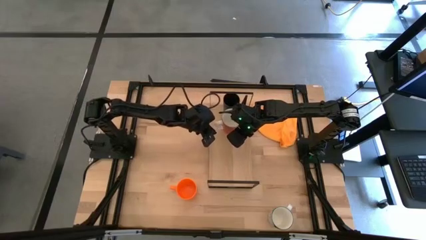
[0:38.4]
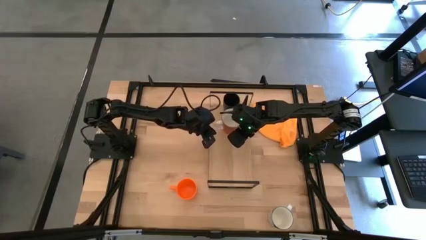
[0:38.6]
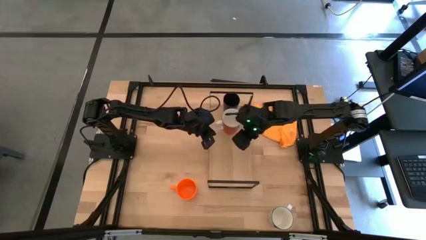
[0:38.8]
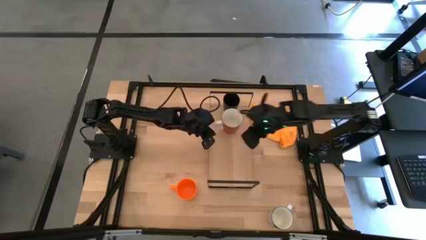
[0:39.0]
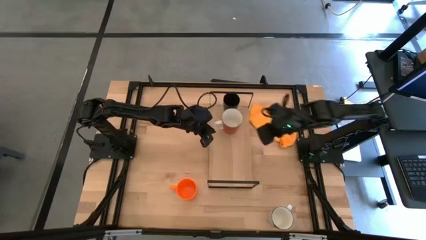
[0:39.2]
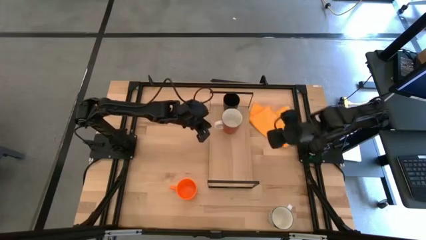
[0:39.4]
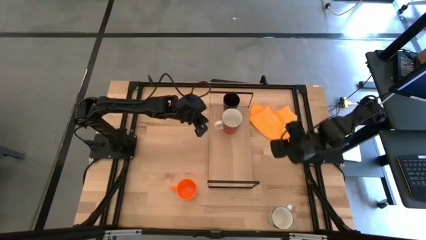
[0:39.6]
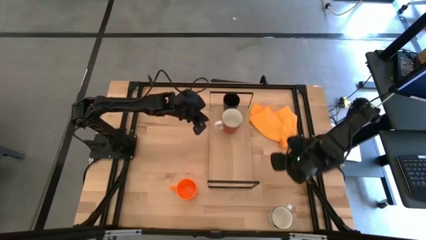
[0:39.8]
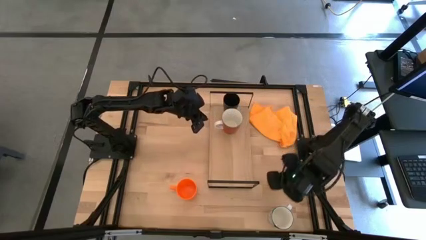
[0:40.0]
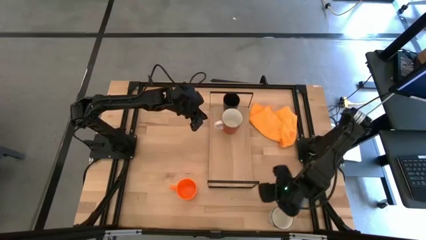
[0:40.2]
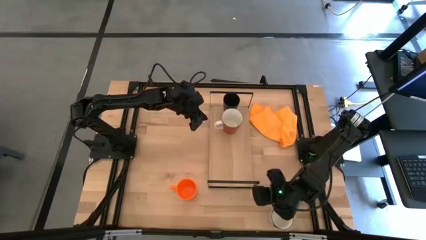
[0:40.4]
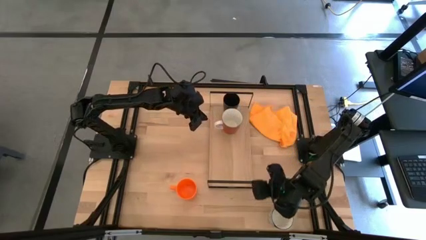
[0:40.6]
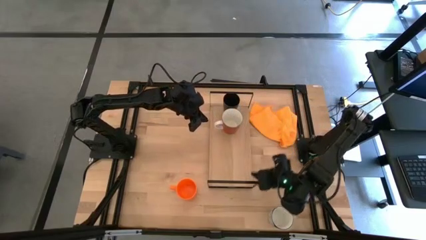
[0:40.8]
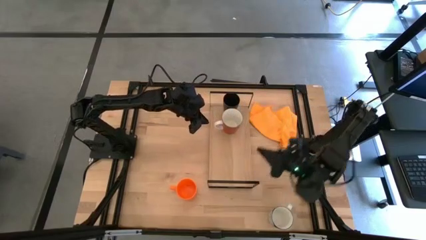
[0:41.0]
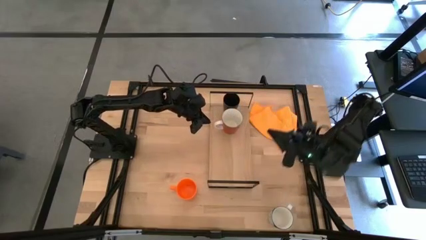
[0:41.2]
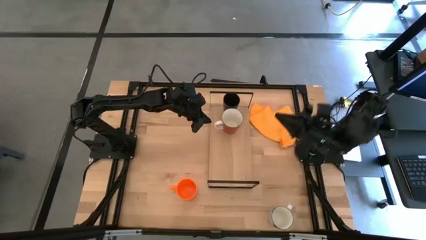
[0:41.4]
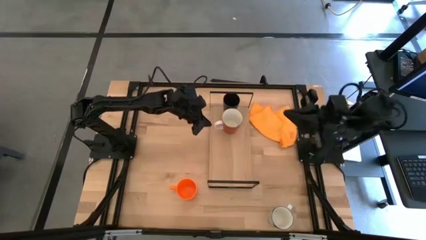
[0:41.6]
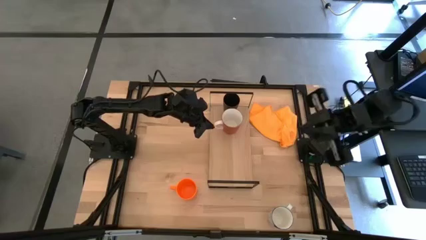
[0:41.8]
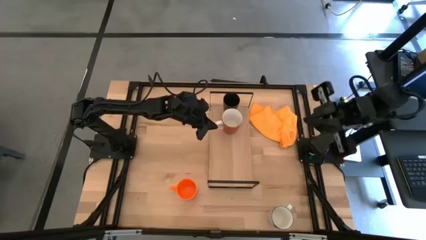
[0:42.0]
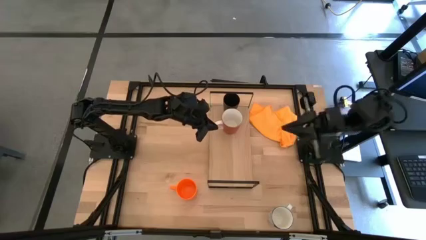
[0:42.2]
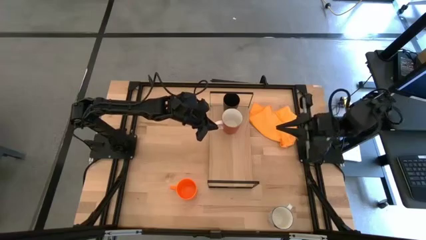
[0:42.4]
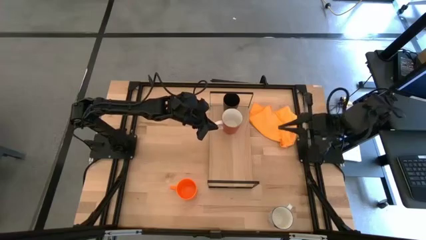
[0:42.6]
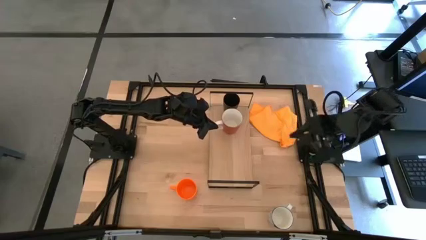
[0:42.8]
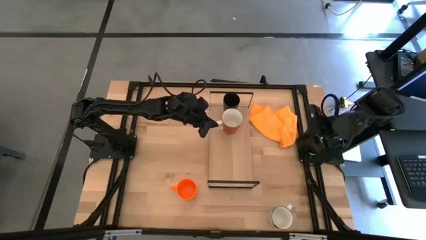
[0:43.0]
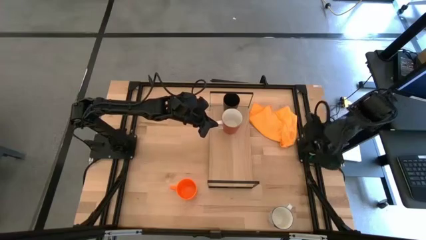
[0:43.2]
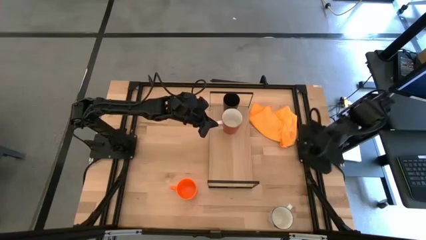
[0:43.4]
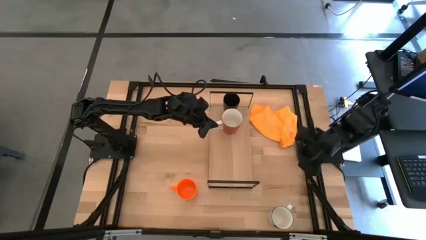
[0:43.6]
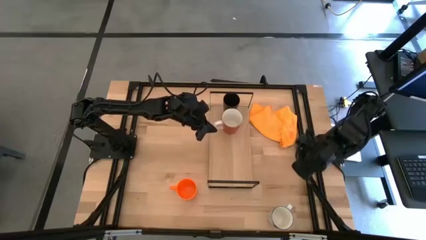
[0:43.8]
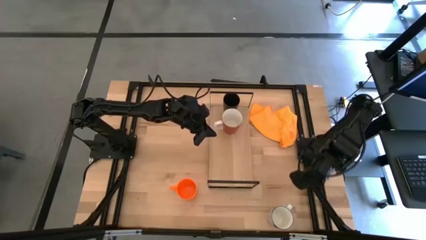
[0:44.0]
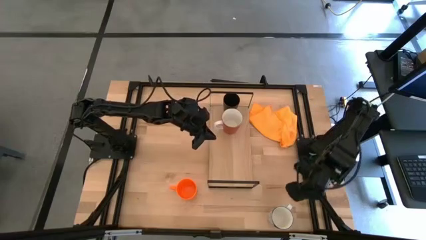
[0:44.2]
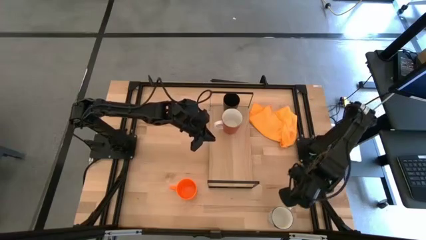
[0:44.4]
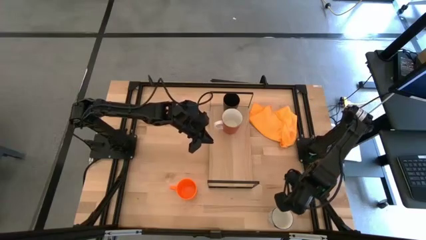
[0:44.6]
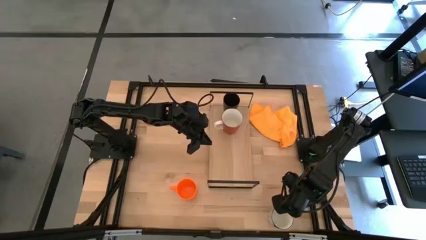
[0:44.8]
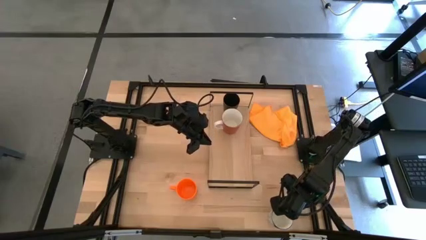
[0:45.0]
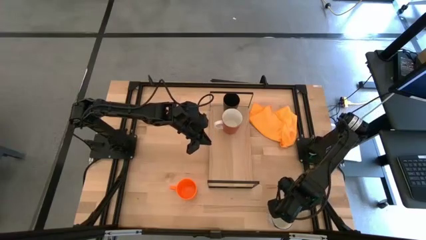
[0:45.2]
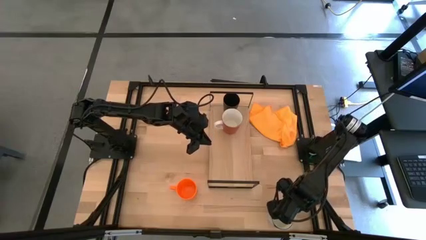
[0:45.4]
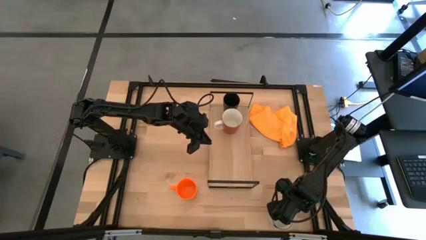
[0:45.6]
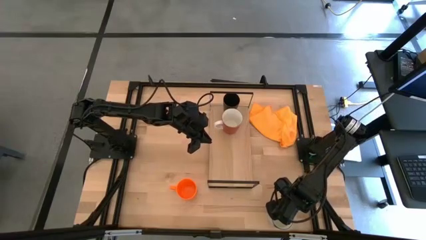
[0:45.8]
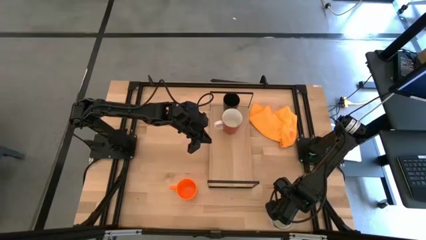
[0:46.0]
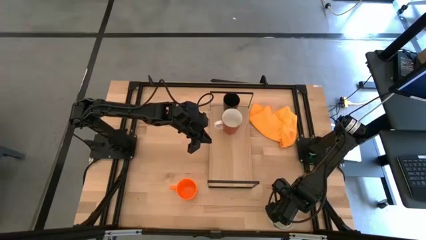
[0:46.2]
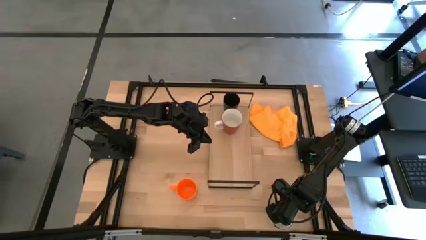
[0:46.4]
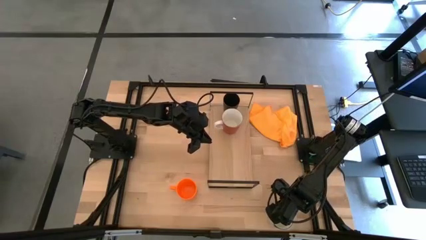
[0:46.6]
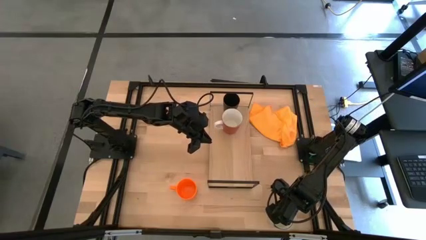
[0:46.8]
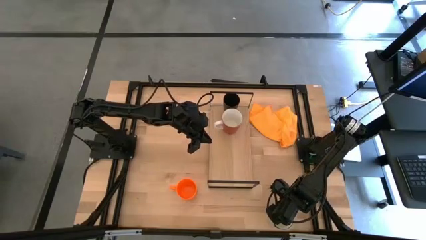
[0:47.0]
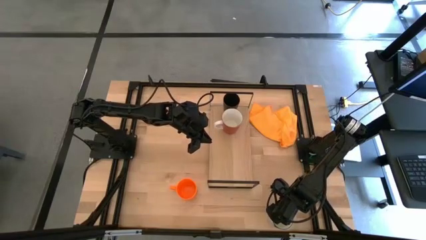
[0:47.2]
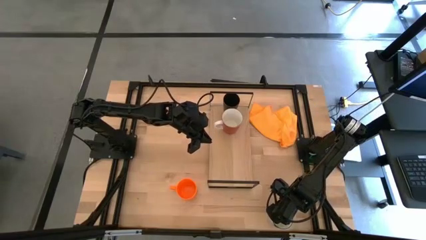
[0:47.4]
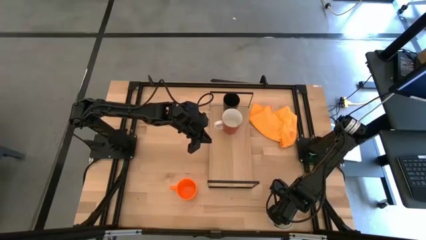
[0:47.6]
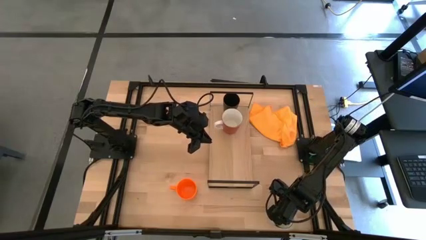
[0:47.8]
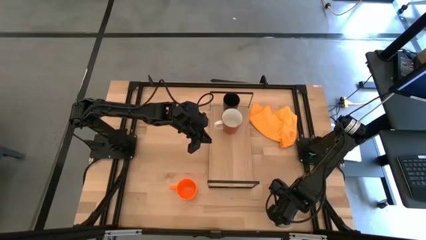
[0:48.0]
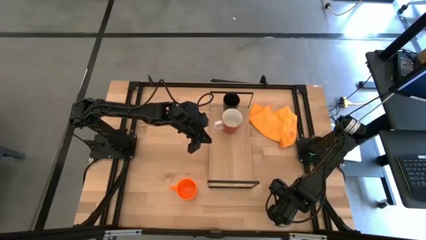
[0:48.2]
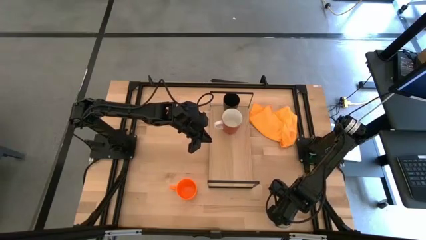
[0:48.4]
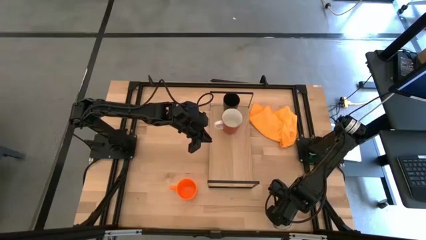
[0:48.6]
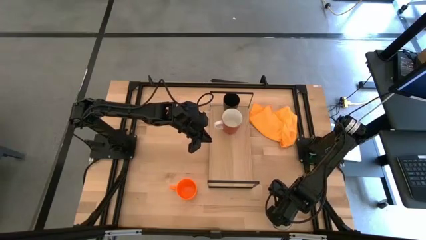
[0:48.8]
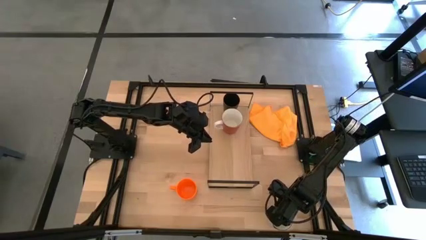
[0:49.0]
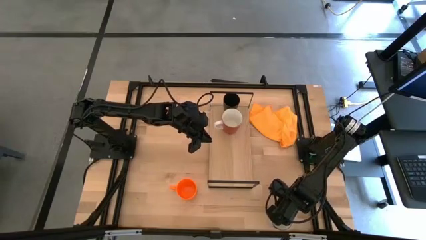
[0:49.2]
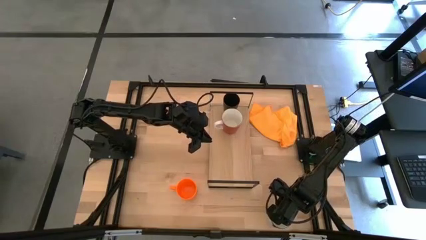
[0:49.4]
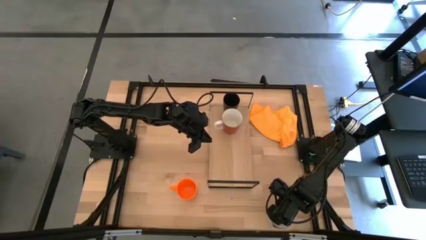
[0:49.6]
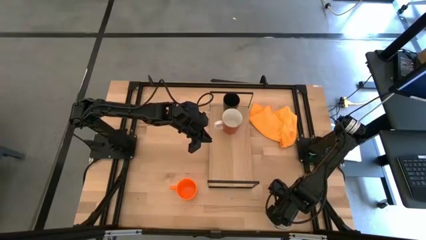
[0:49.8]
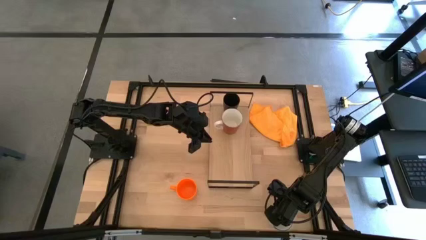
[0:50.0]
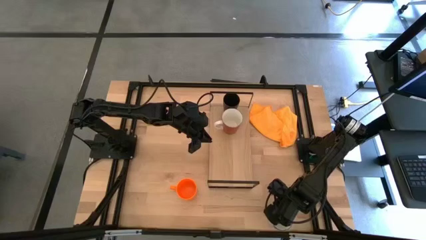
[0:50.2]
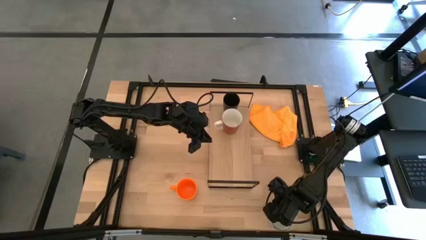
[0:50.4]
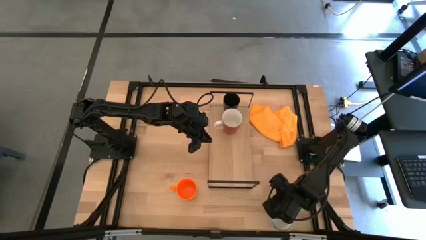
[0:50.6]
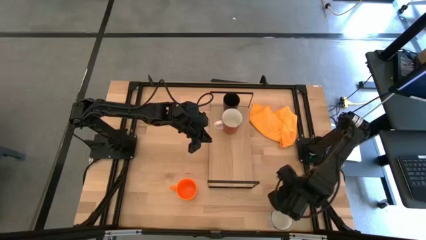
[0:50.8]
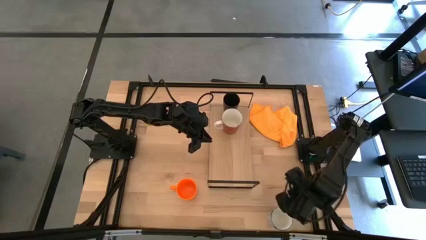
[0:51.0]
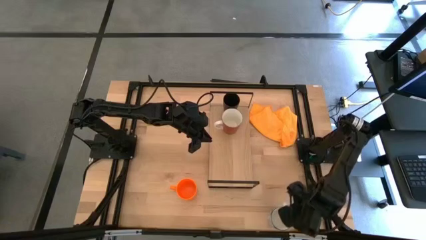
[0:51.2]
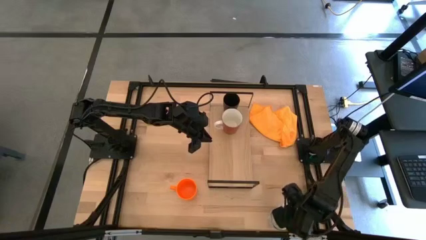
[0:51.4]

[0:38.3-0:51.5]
Task: Stack small to large cups/mugs on shelf
Put the blue pattern mug align with the red pattern cup on the shelf

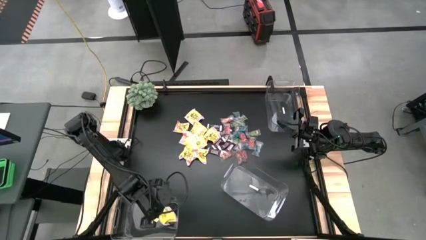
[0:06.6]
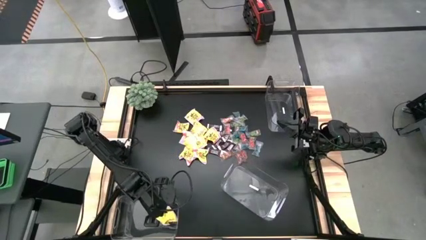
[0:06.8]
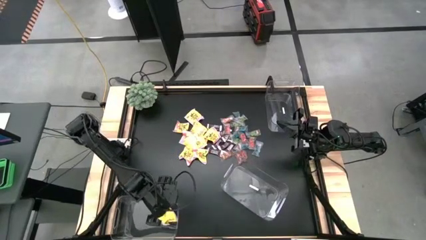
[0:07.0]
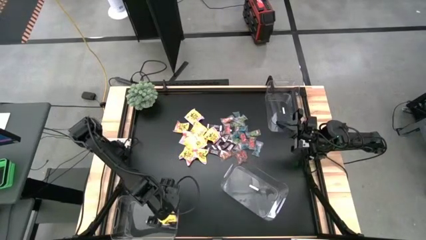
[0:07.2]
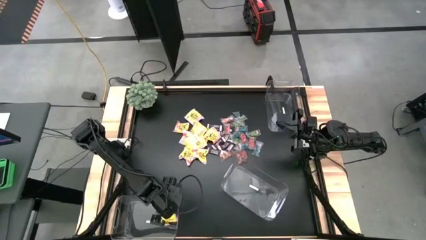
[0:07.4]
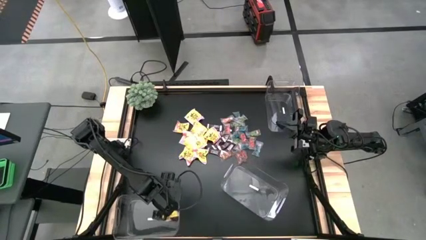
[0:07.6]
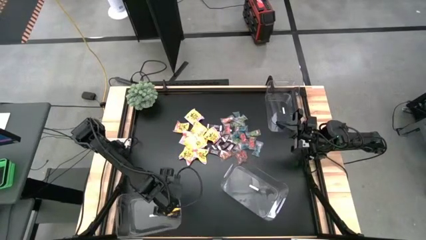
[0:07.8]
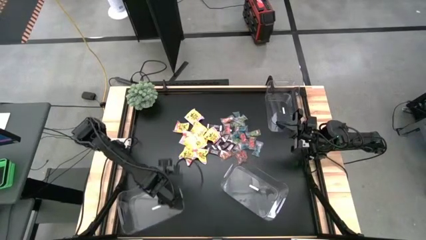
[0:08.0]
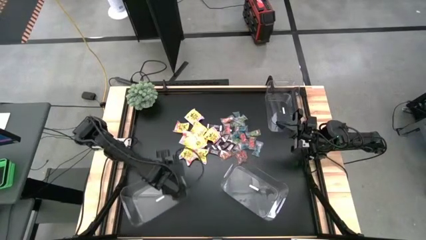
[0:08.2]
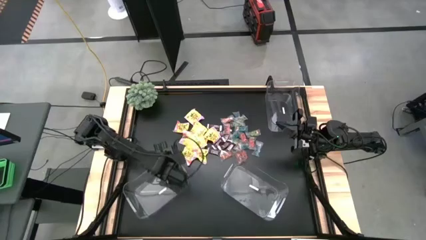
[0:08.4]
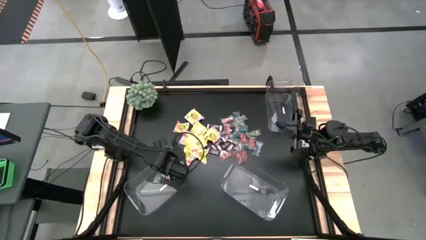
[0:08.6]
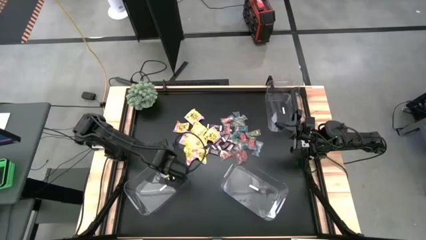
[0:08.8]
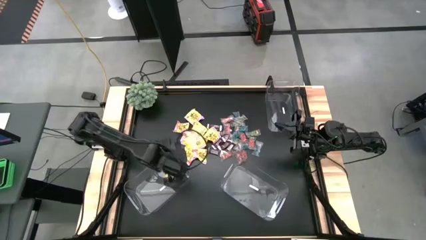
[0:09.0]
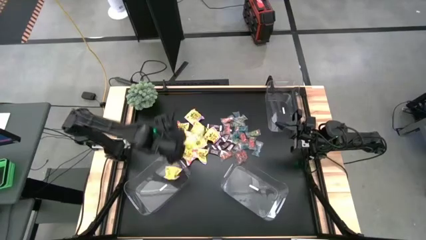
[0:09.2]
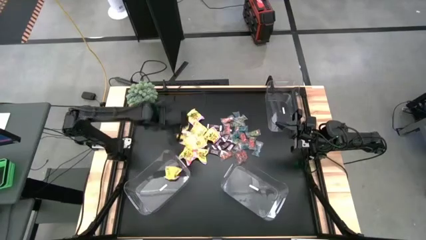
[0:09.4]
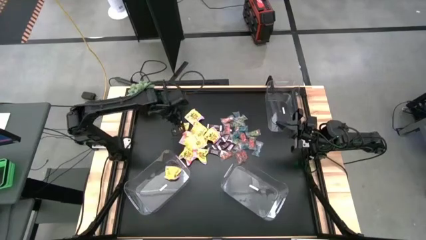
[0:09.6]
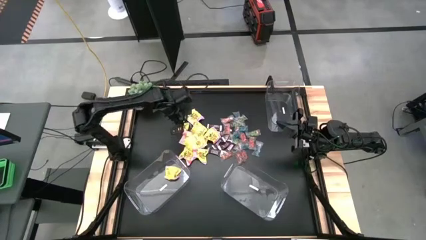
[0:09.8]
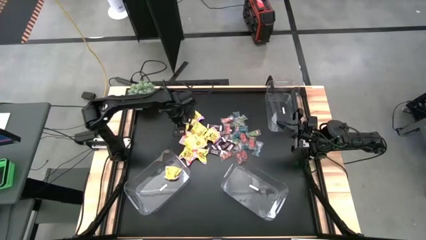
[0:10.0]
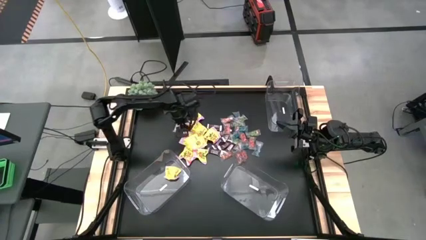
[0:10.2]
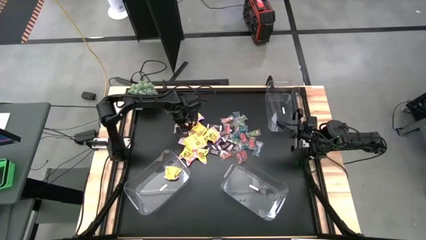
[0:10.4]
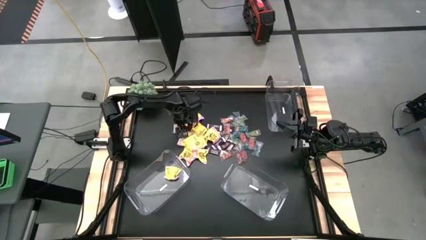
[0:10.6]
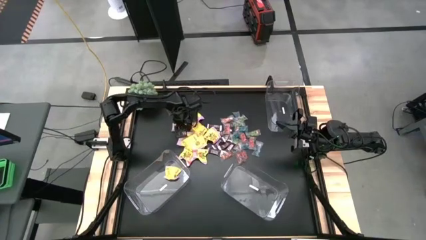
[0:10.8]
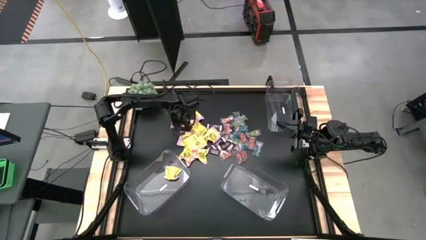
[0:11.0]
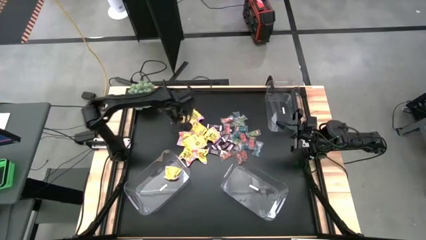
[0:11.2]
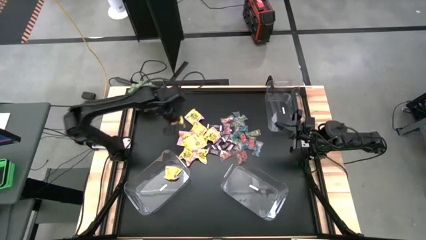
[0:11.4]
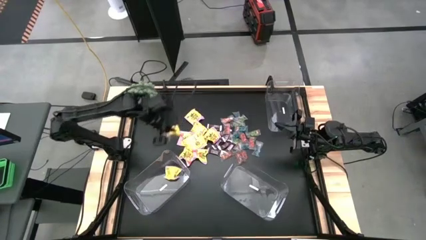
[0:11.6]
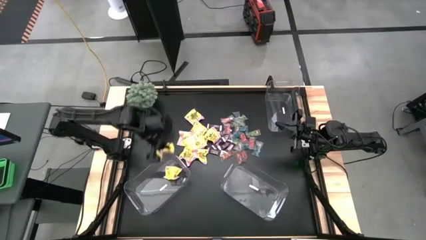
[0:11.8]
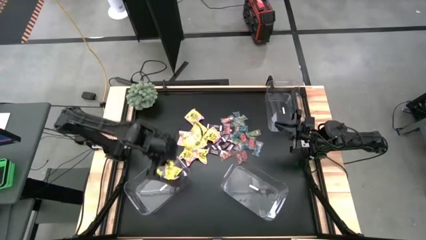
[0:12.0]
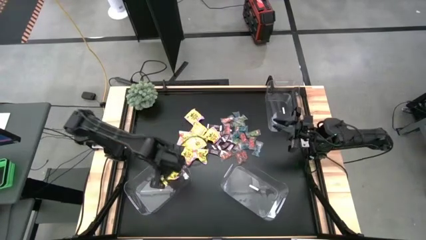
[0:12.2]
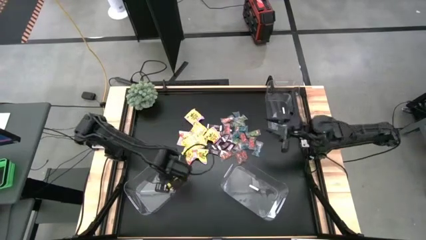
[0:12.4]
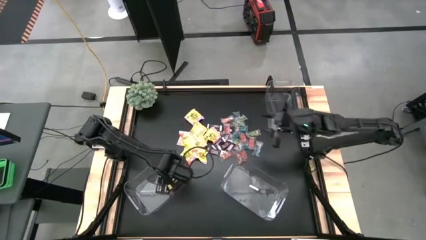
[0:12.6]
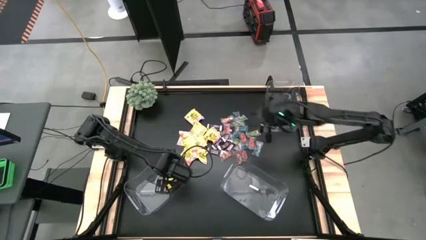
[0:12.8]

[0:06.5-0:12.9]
Task: Sort candy
Put the yellow candy in the bottom left transparent container
